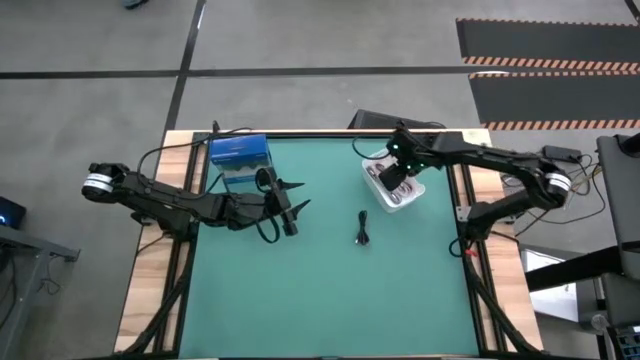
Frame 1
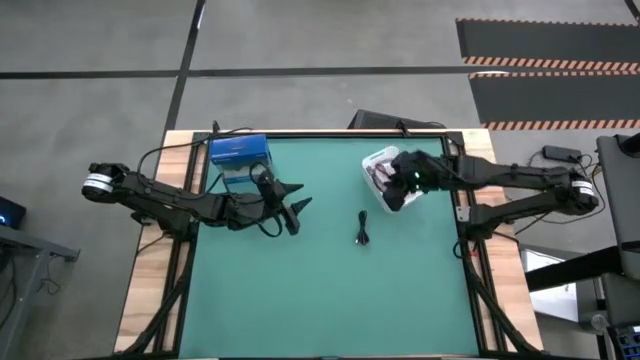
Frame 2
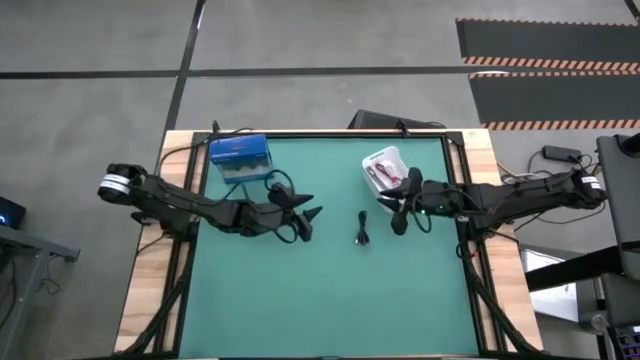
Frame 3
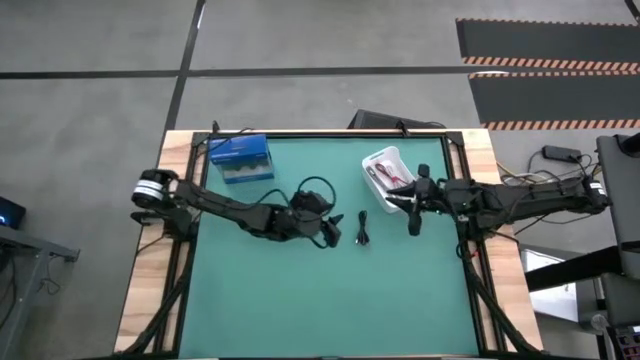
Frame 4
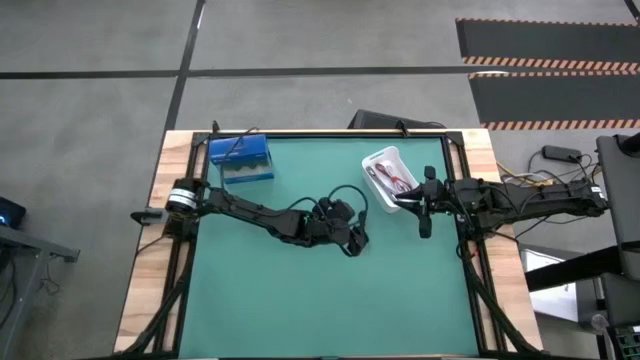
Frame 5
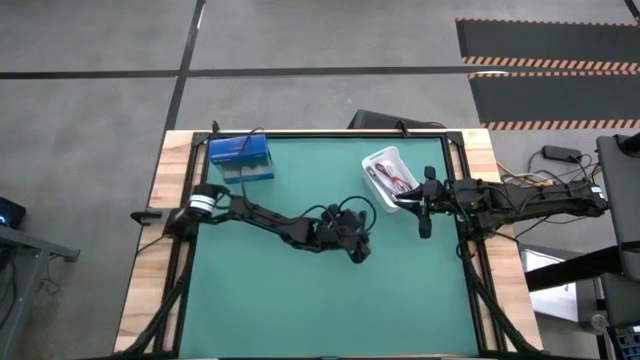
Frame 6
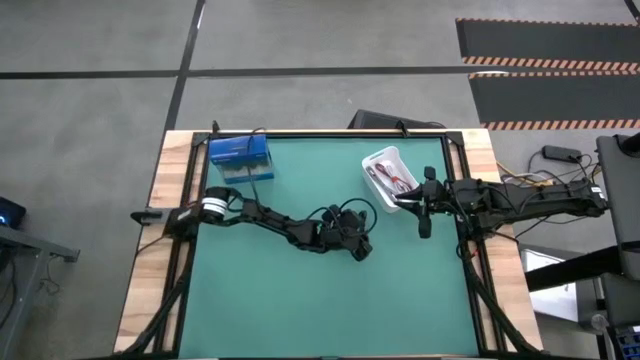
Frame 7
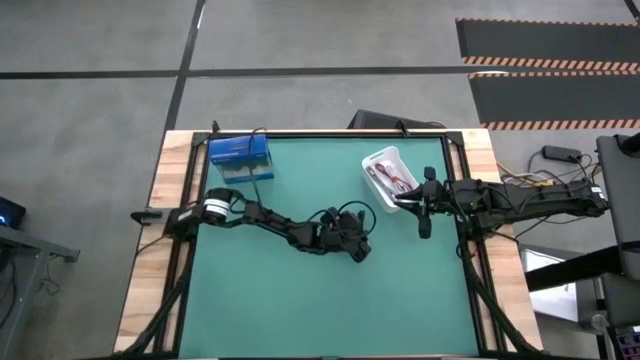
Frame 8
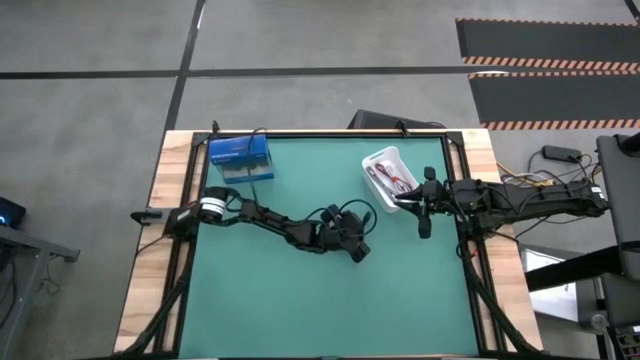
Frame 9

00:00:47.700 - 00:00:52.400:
Task: Pick and place USB-C Cables
Put the black charger cable into the white container

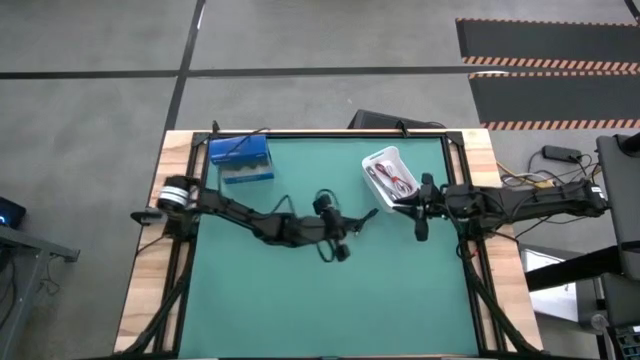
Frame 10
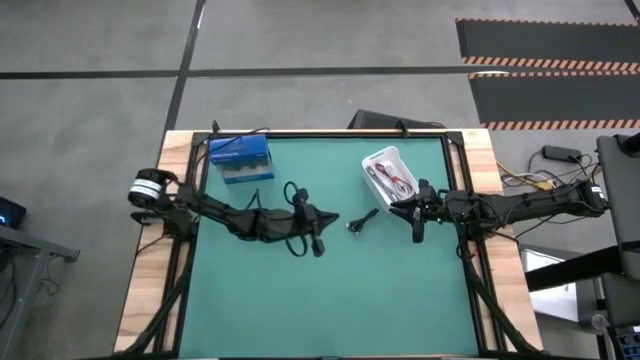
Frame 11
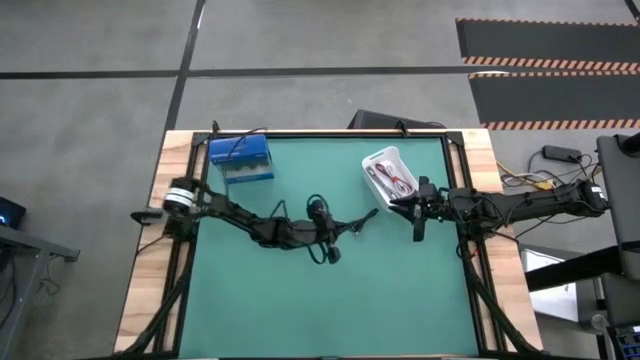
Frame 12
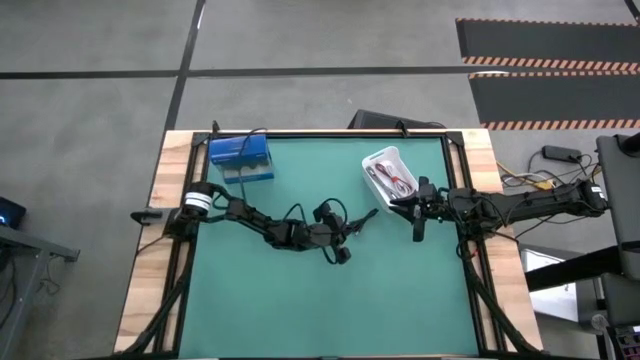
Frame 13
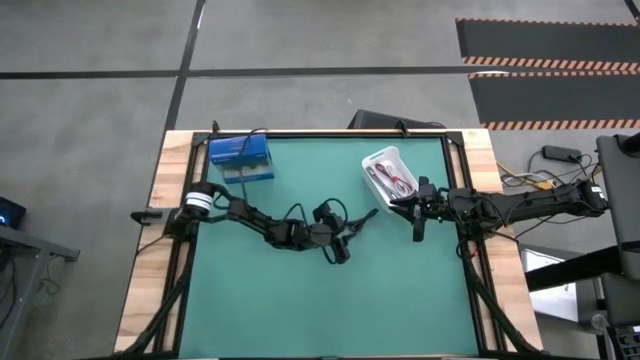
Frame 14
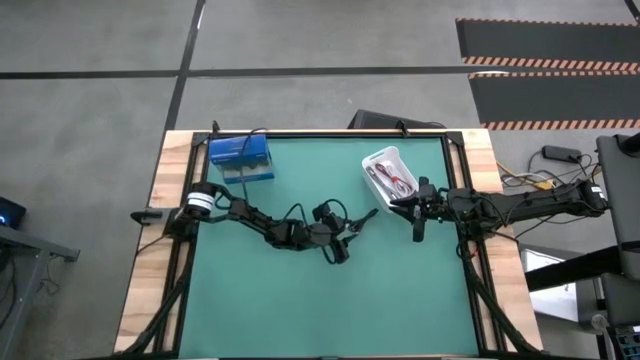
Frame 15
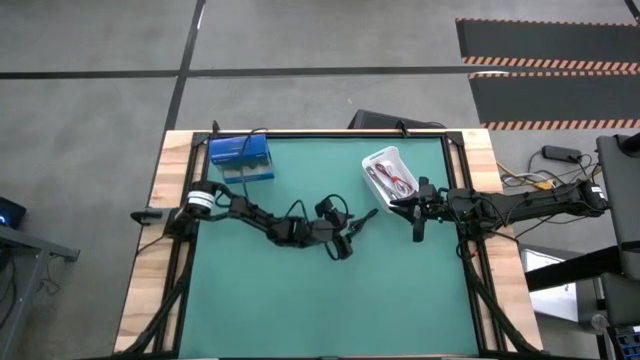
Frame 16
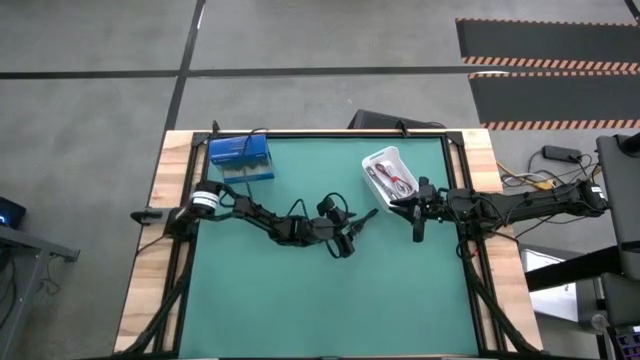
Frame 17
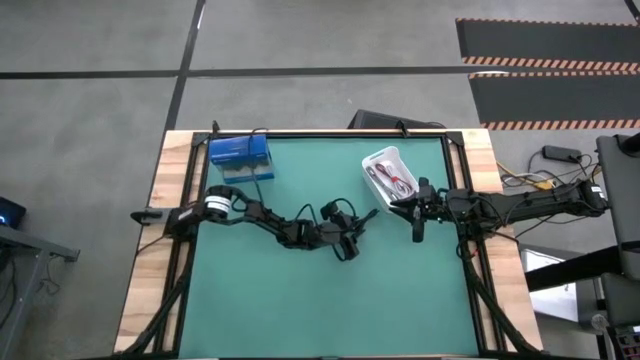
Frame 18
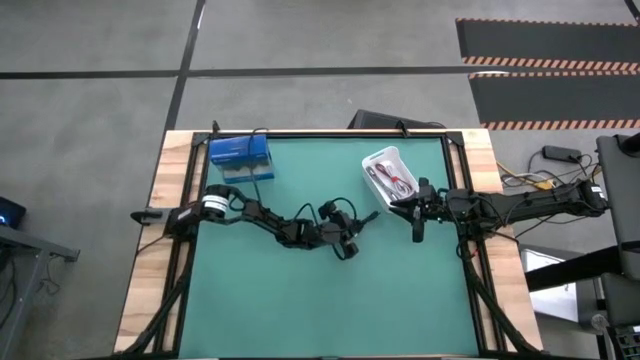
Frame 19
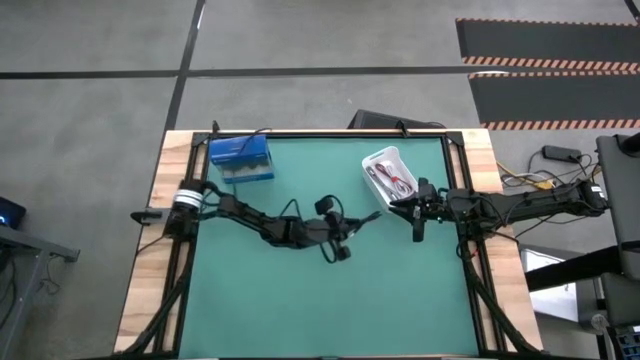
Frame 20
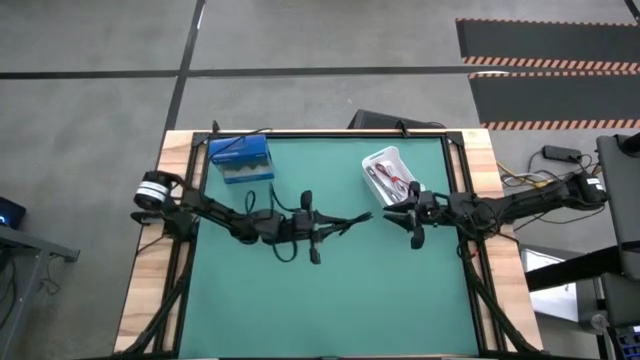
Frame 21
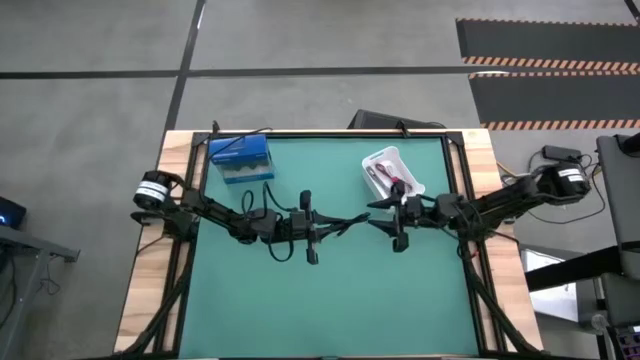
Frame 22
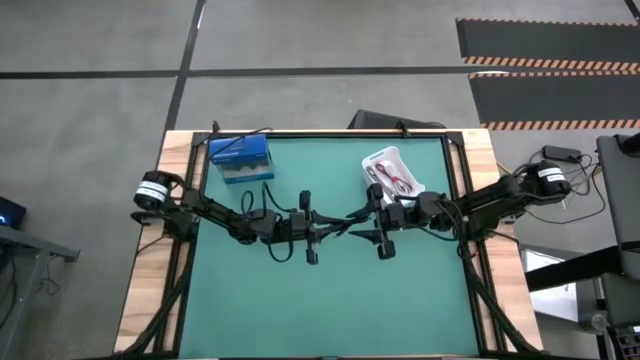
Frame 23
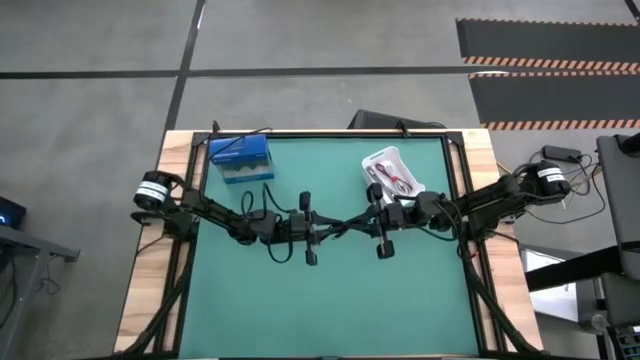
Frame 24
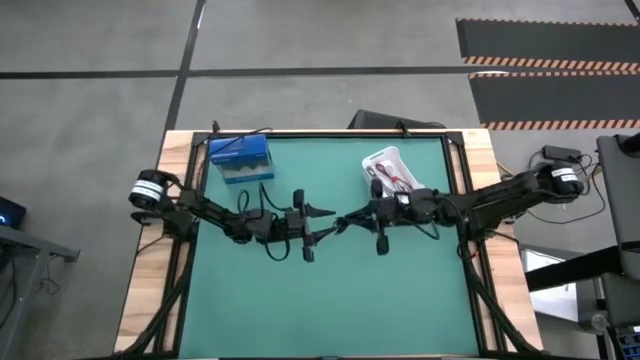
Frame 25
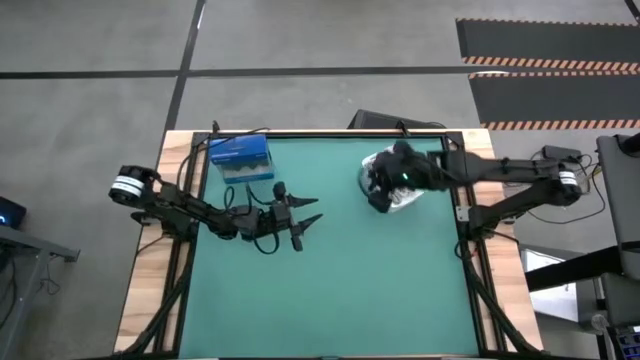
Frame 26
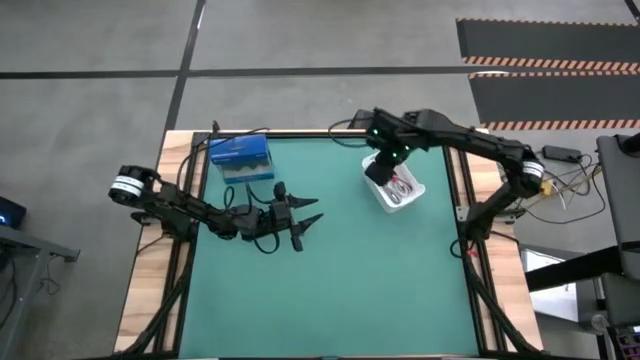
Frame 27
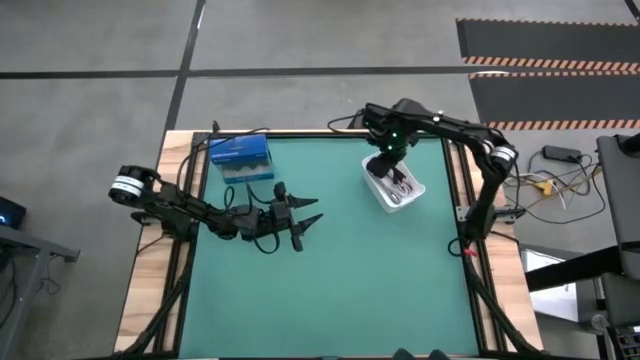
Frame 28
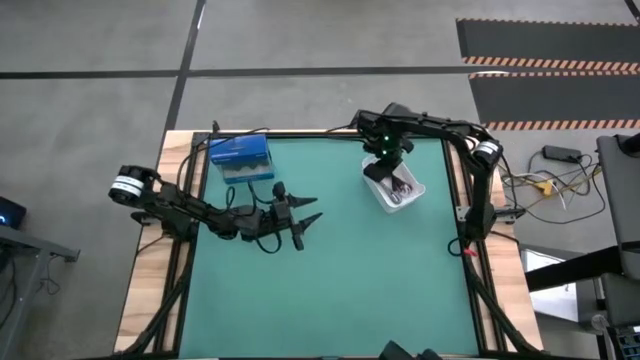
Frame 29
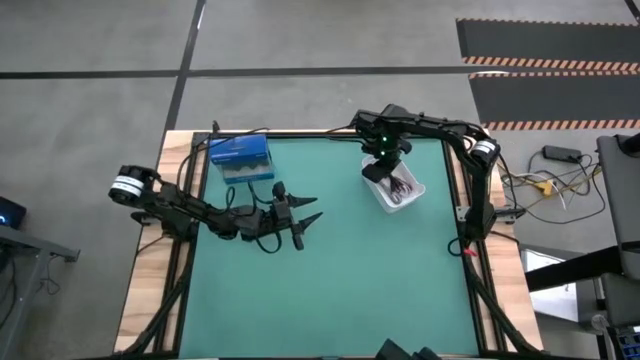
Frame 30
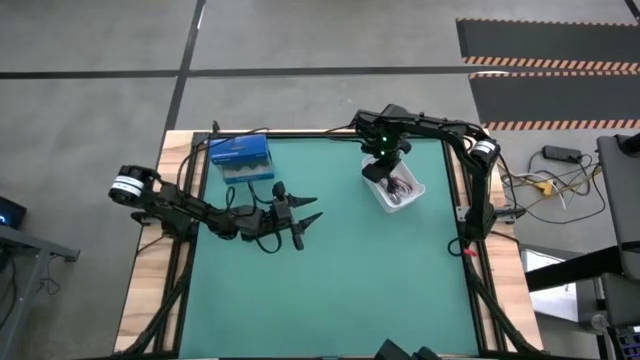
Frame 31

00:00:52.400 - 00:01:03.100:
Put the black charger cable into the white container

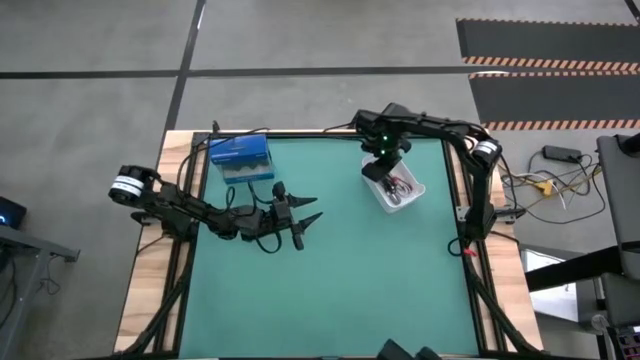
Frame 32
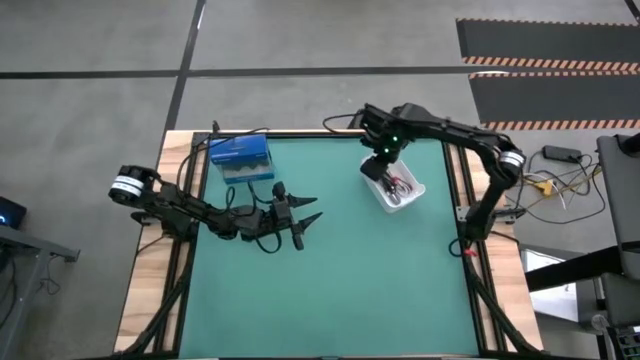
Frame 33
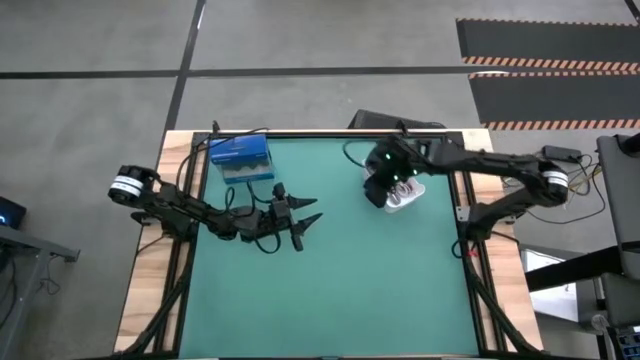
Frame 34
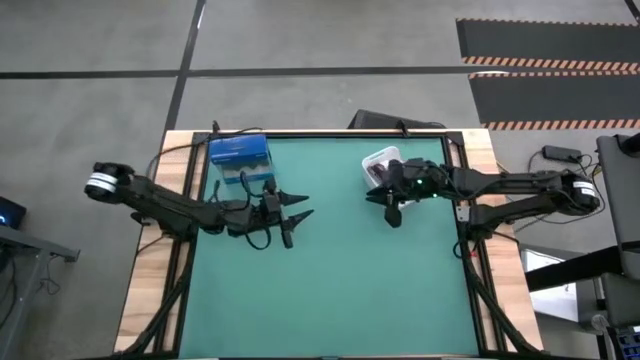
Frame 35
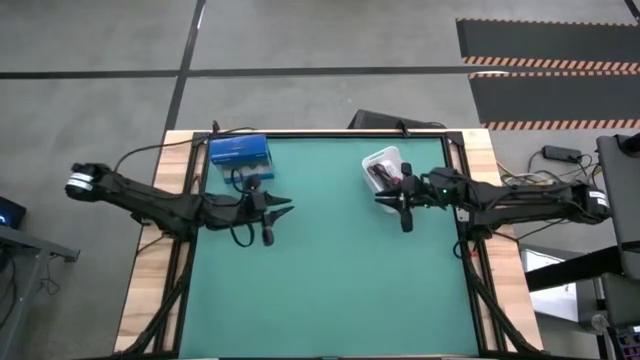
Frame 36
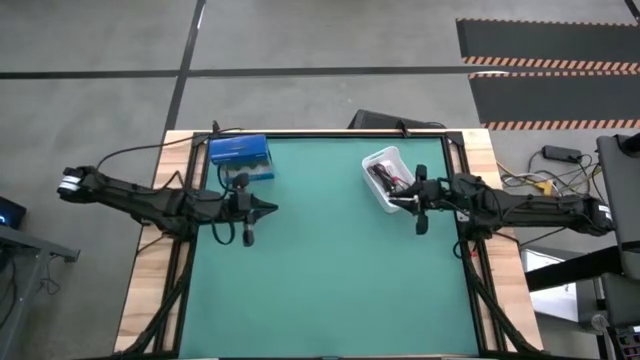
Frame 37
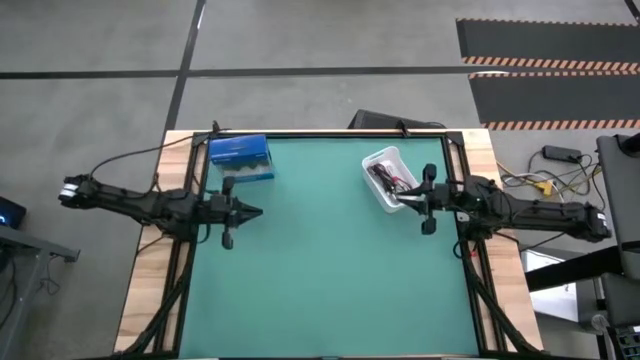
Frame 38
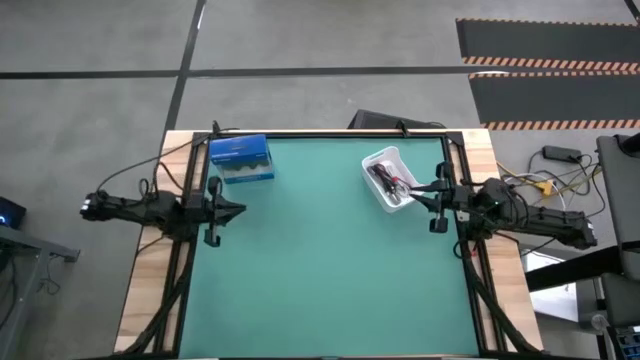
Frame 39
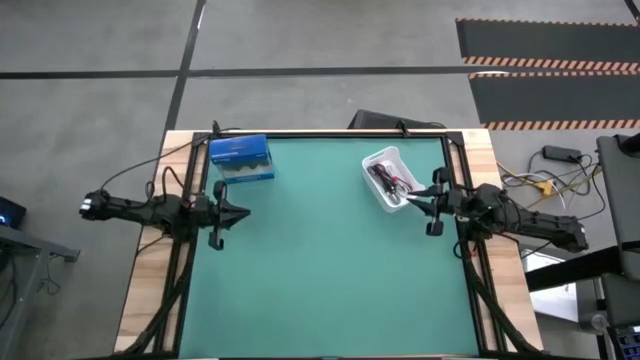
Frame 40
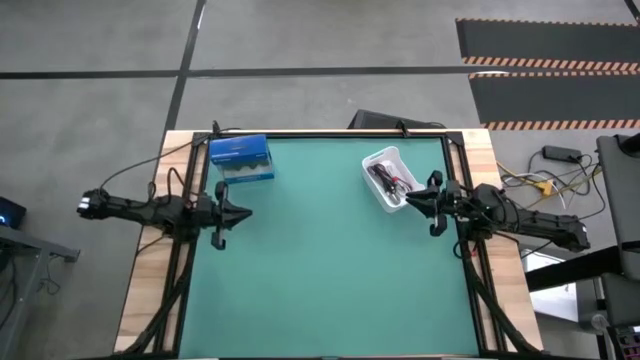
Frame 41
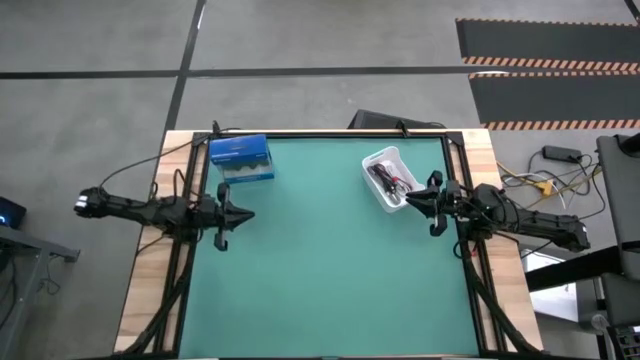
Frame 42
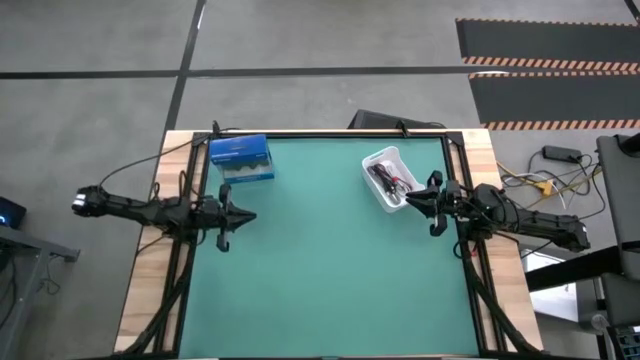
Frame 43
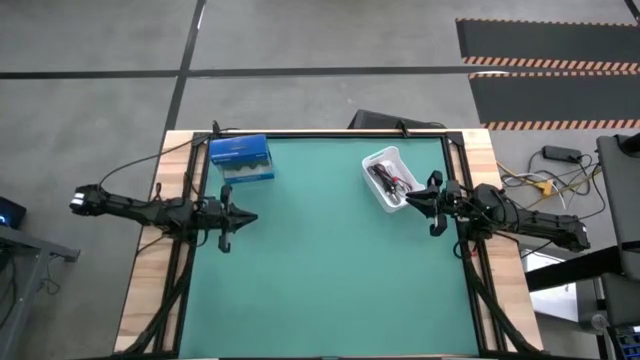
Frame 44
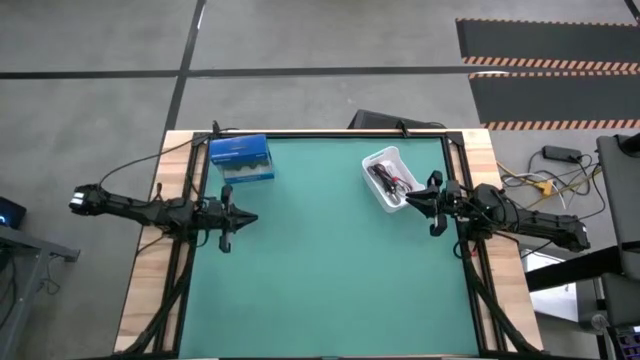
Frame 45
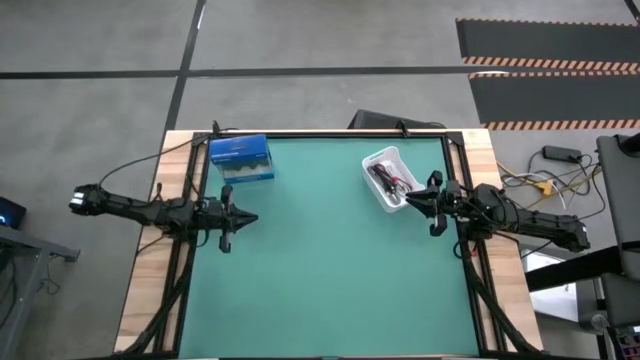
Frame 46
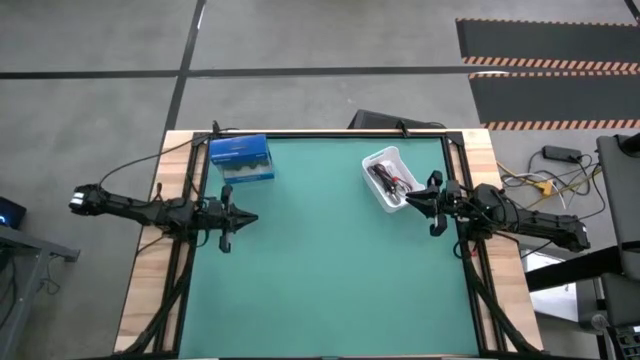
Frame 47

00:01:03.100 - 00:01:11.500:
Return to Home Position
